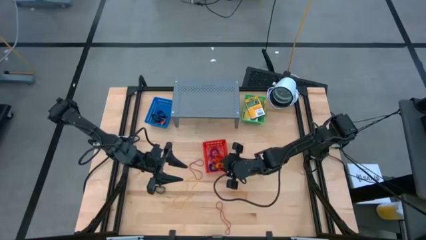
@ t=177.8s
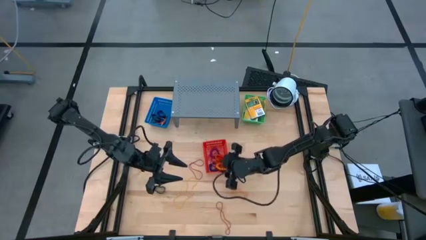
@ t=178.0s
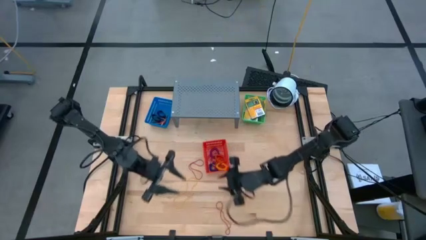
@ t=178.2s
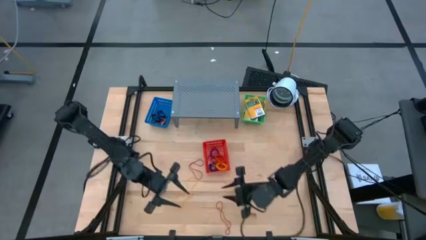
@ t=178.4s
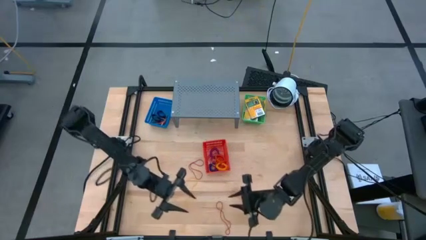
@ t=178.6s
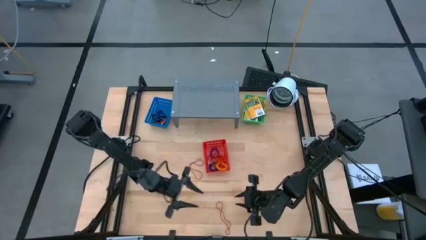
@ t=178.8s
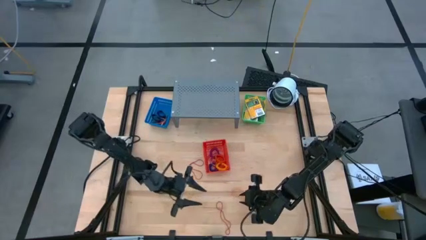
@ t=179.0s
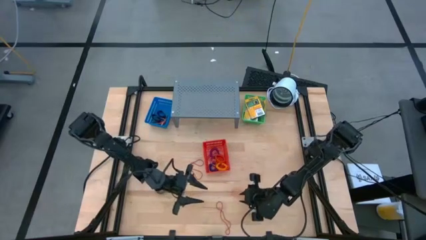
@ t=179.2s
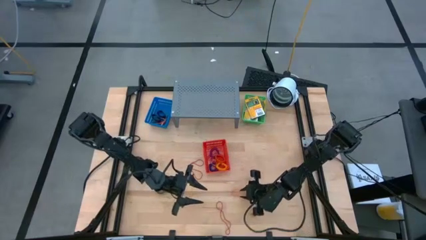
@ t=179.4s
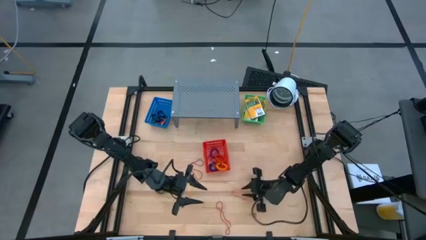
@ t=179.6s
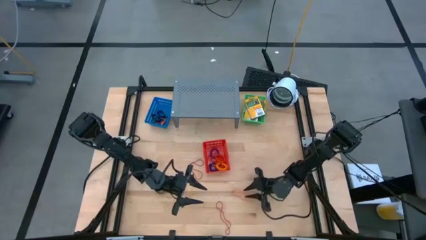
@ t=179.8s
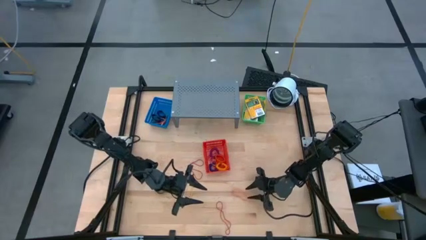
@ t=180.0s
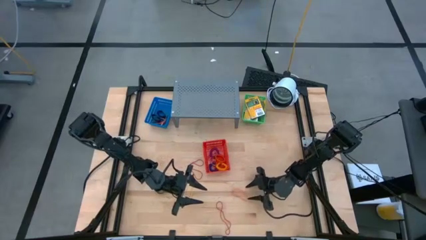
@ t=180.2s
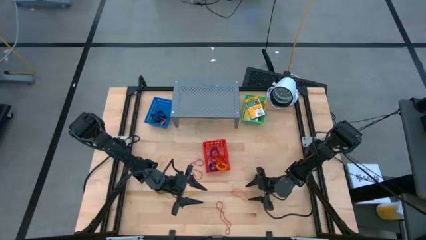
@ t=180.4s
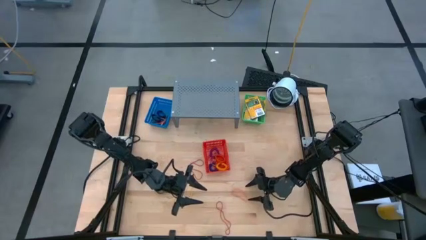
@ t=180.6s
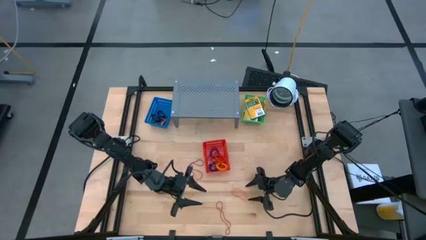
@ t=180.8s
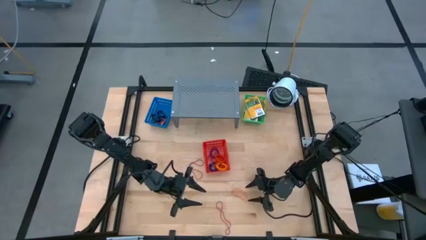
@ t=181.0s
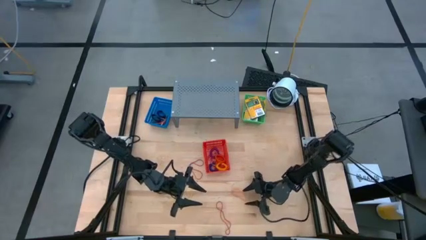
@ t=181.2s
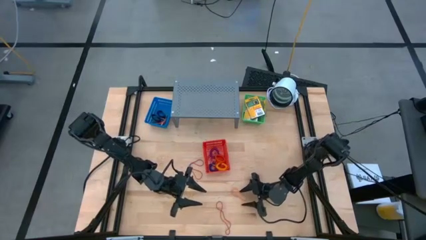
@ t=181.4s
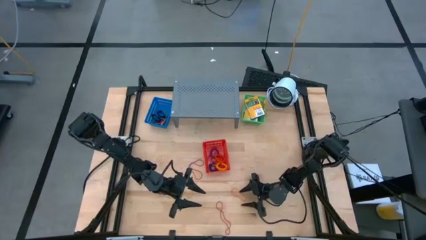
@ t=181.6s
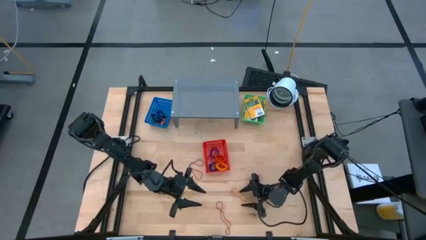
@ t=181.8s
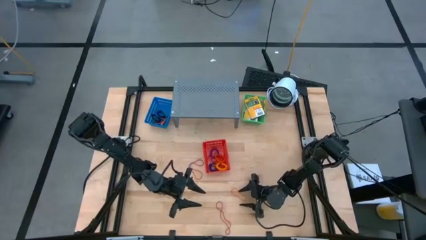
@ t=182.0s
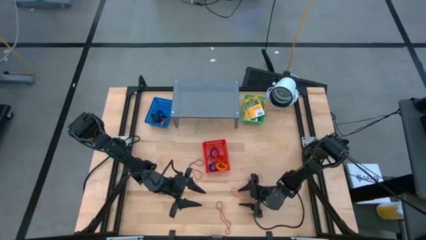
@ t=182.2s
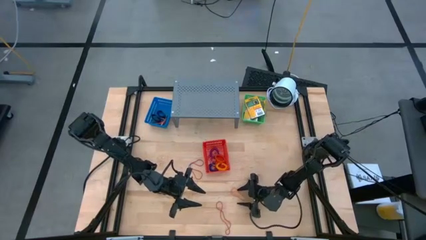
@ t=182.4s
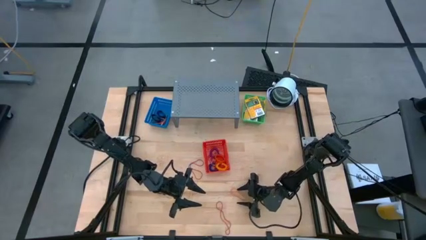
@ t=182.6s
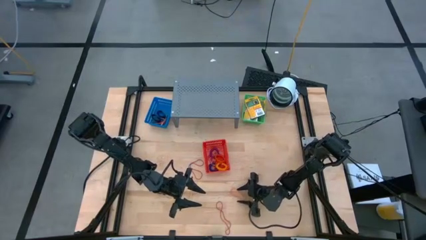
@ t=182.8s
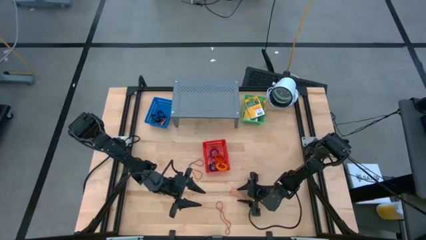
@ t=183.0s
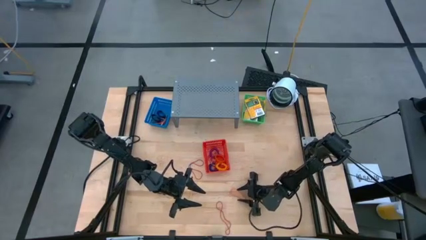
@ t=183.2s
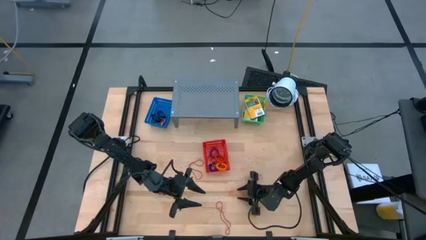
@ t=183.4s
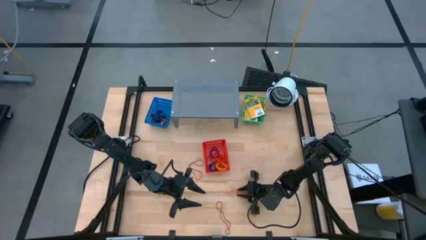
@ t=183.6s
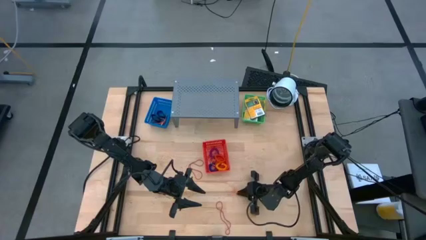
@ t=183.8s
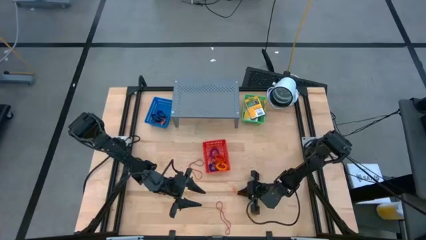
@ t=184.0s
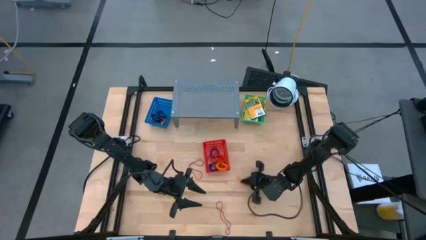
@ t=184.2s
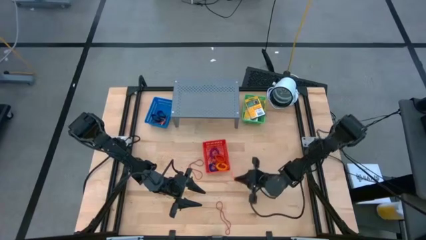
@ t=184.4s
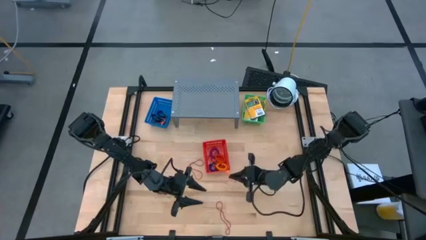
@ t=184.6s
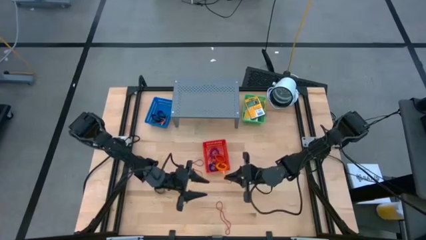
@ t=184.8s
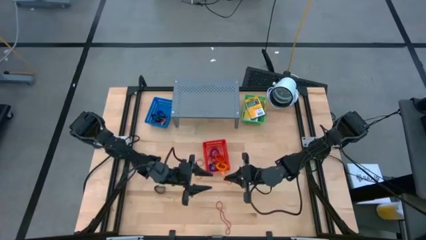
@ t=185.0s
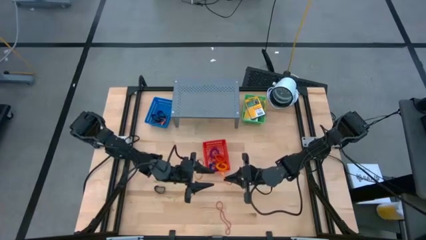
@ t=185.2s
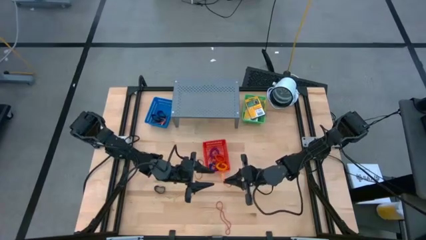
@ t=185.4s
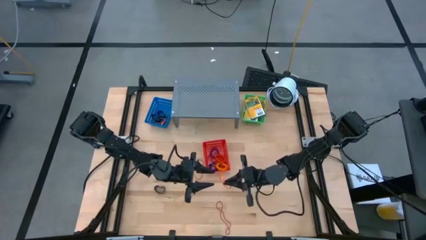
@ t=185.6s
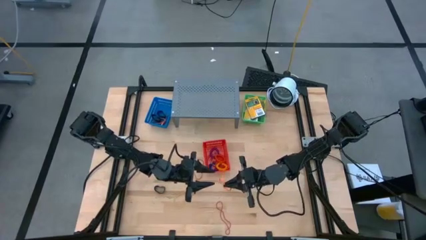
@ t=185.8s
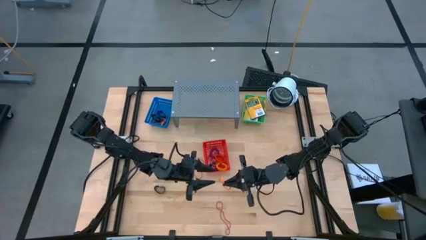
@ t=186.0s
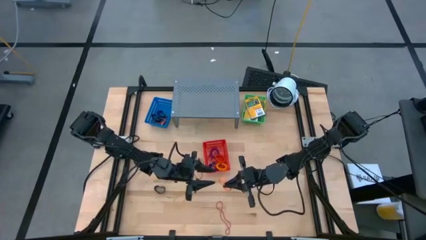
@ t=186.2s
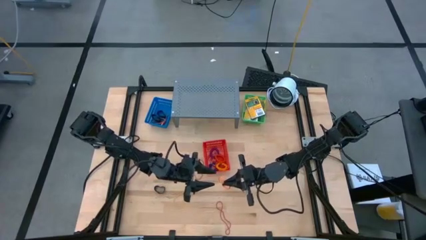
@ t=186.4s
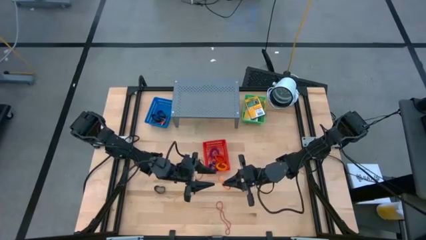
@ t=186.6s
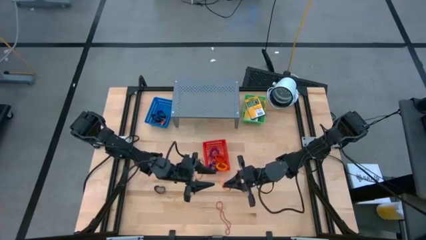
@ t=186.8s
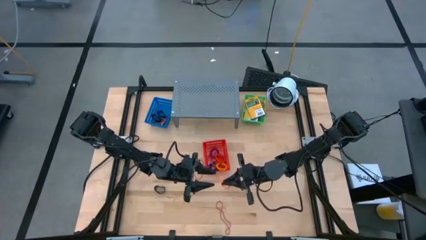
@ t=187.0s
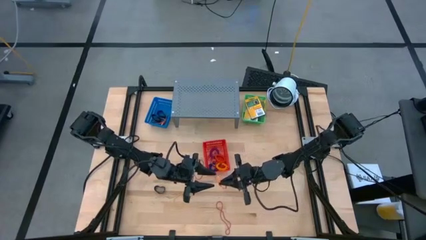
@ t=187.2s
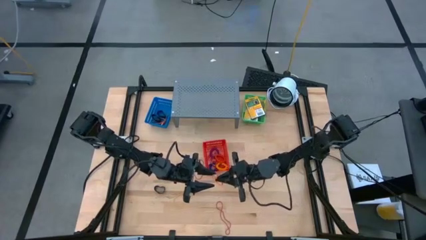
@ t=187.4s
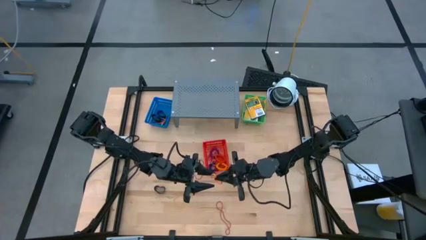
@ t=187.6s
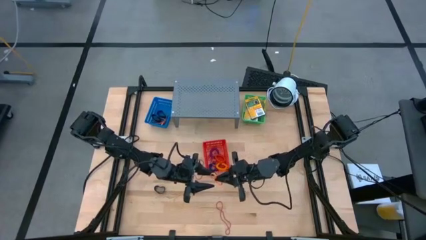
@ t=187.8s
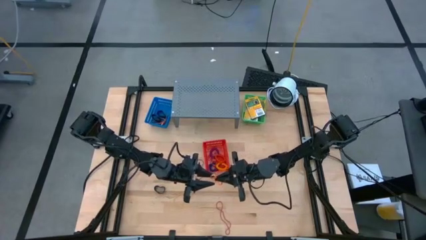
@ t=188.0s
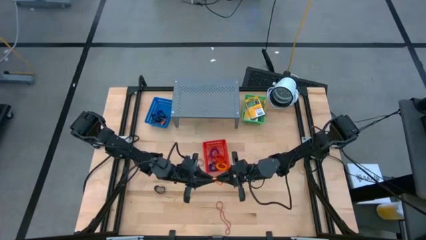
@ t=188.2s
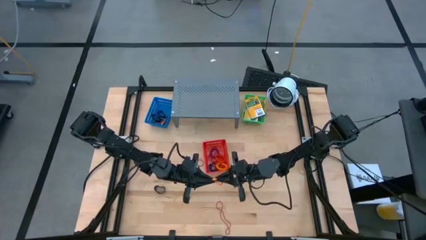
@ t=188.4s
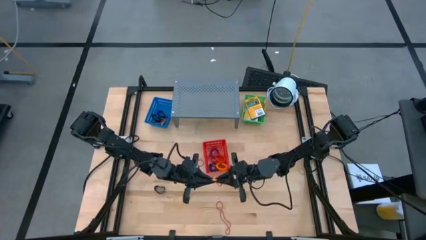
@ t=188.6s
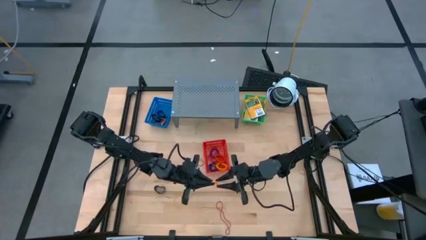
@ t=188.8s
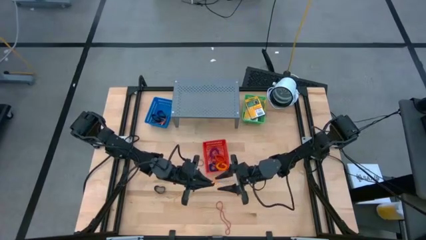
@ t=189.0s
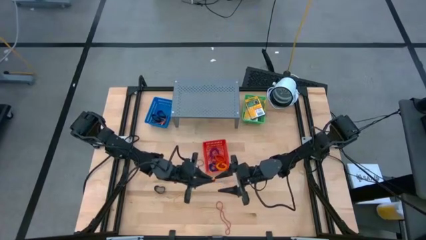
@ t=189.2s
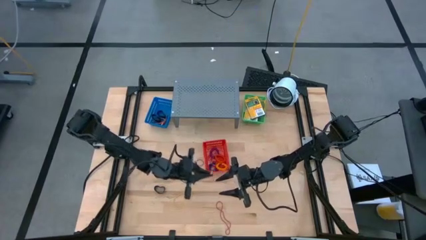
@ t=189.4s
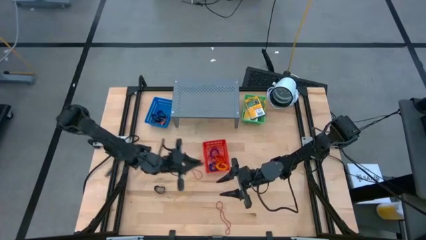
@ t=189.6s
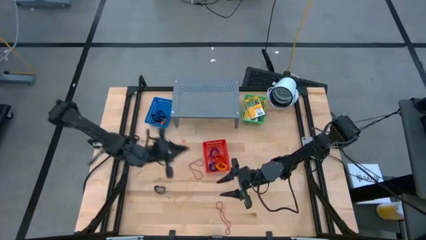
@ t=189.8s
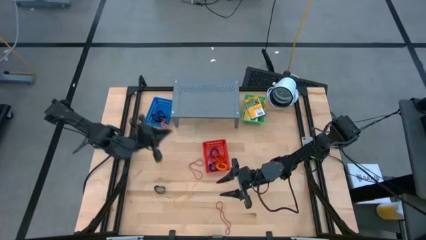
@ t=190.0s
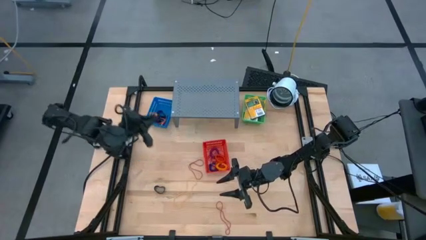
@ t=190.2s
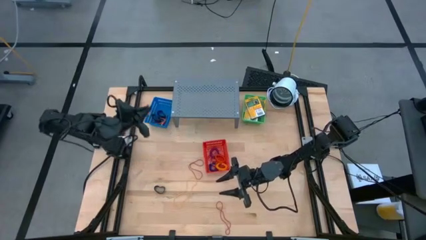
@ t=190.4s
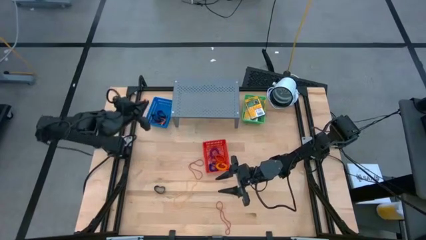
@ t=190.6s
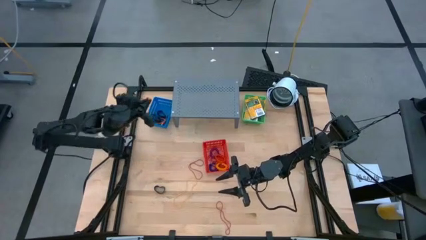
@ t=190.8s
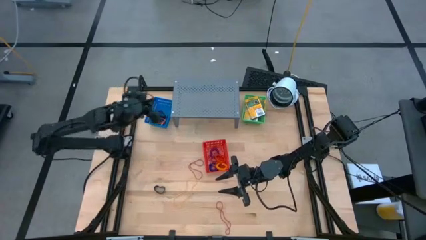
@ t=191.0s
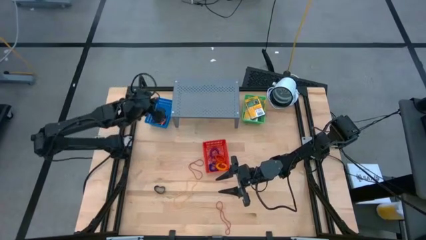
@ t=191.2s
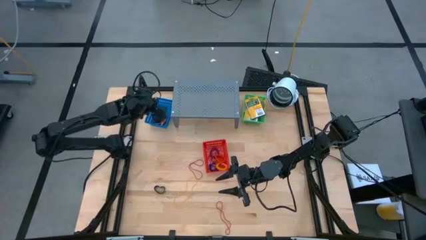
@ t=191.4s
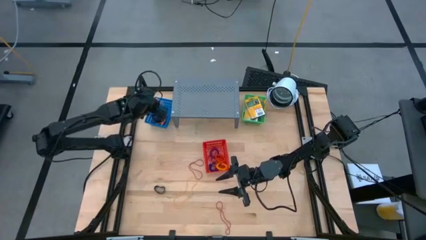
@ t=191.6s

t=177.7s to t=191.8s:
Task: Pick & Place Office Desk Supplies
Put the orange rubber band into the blue basket
